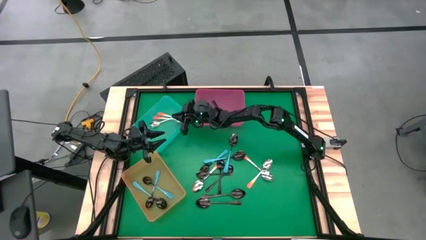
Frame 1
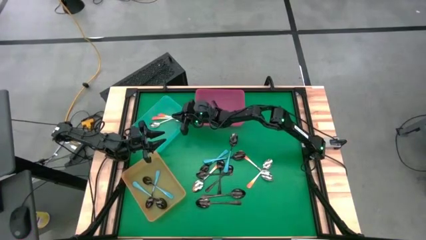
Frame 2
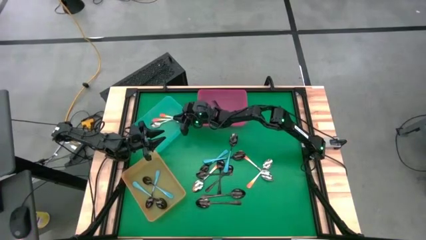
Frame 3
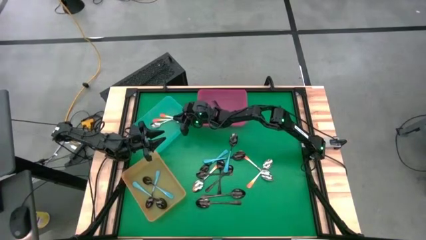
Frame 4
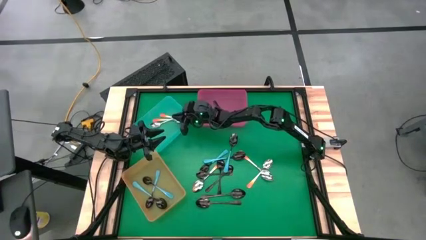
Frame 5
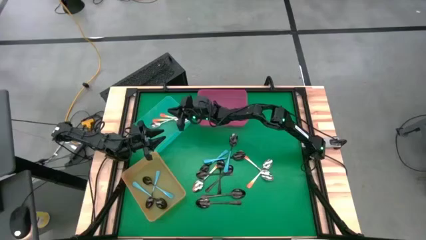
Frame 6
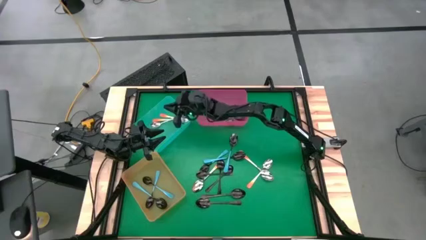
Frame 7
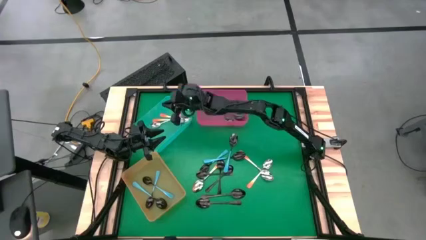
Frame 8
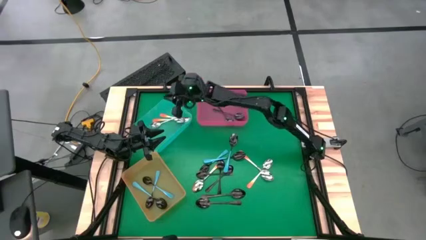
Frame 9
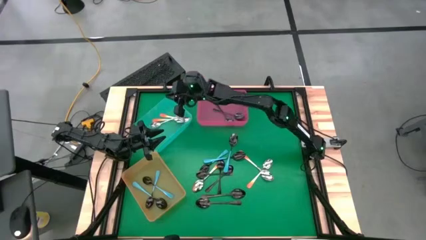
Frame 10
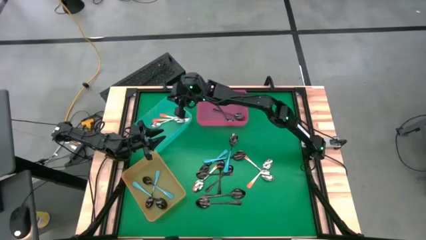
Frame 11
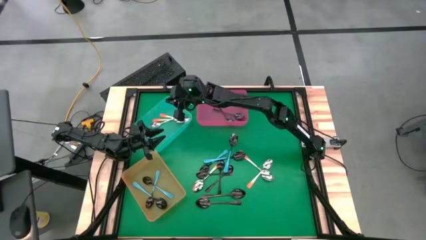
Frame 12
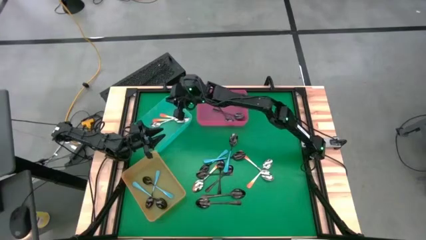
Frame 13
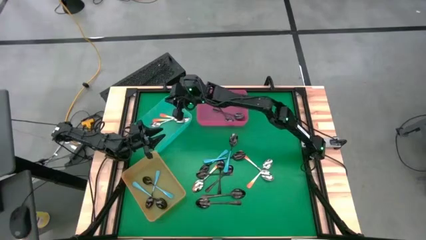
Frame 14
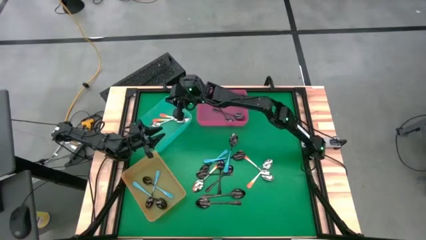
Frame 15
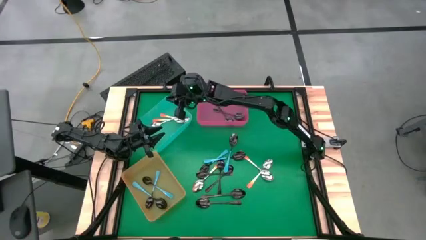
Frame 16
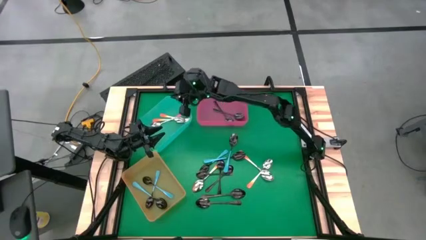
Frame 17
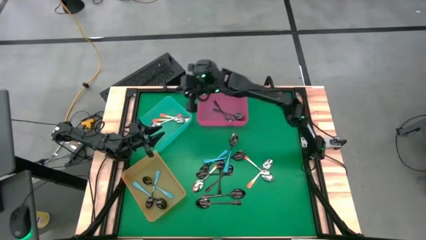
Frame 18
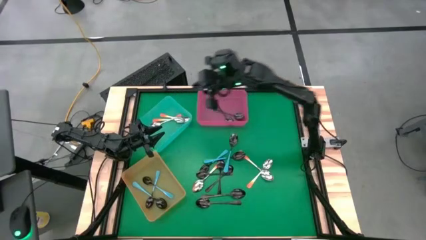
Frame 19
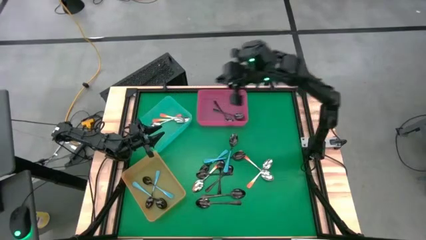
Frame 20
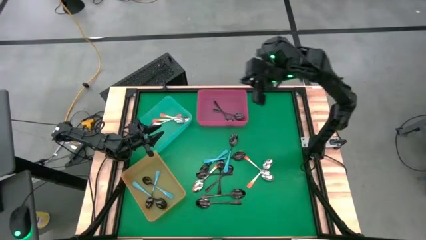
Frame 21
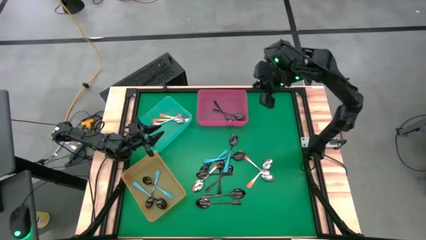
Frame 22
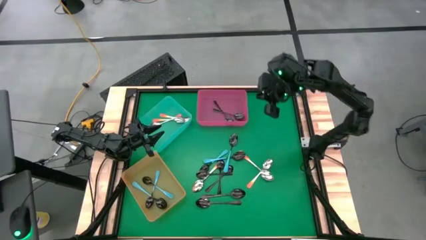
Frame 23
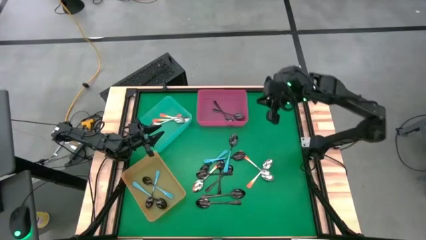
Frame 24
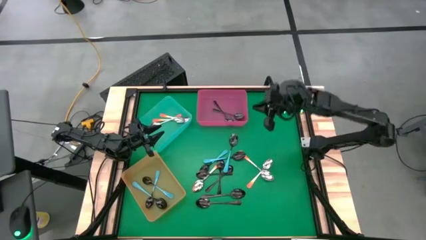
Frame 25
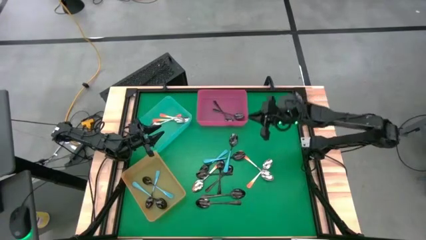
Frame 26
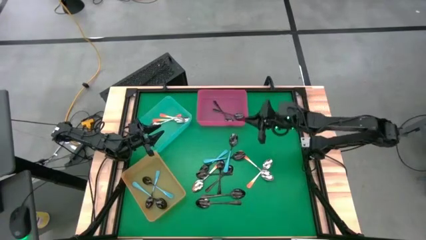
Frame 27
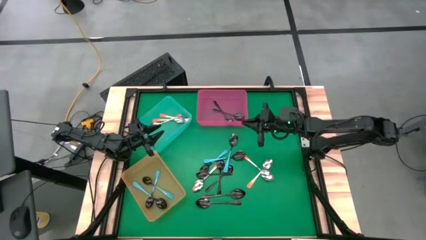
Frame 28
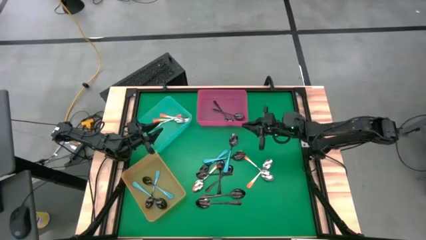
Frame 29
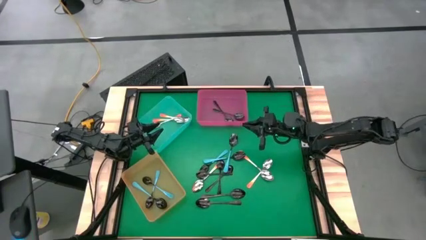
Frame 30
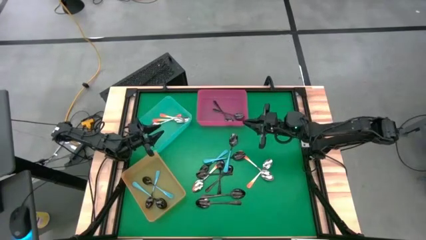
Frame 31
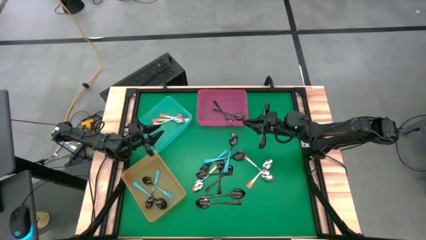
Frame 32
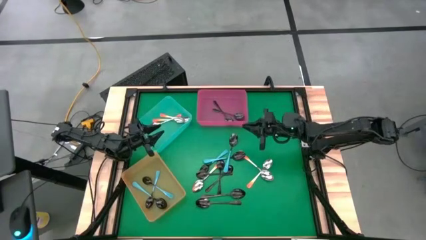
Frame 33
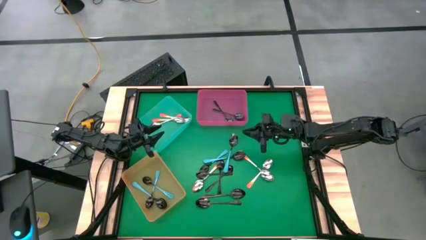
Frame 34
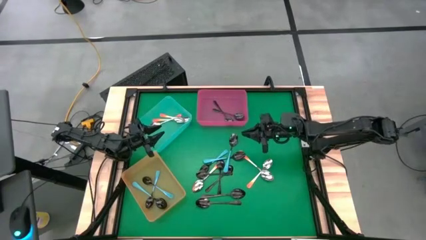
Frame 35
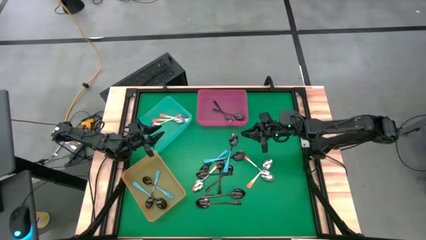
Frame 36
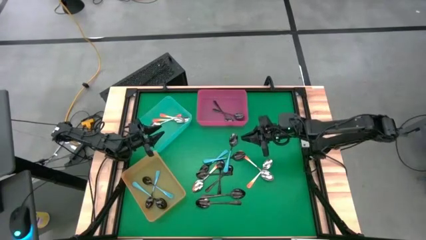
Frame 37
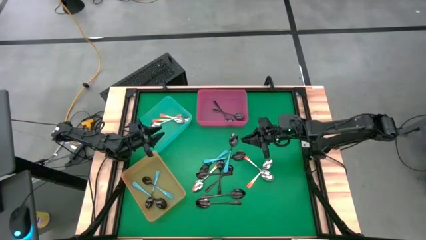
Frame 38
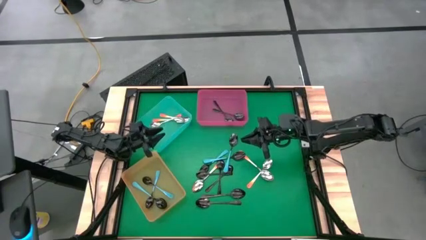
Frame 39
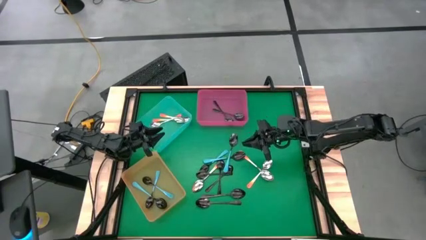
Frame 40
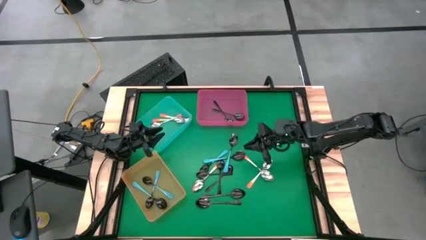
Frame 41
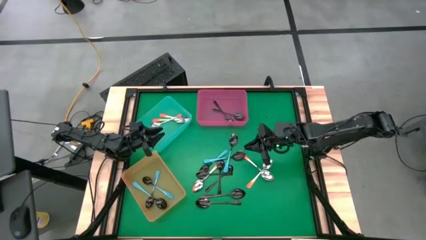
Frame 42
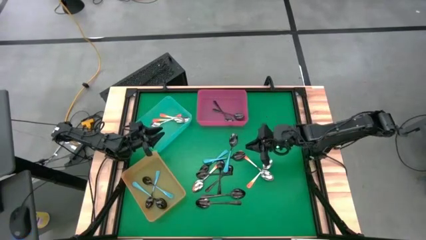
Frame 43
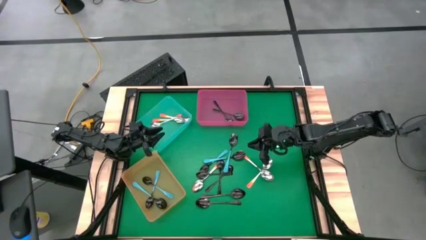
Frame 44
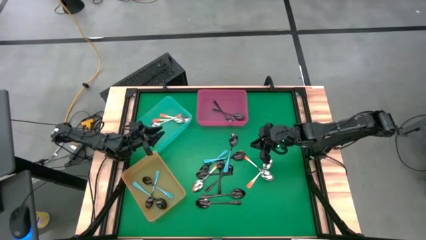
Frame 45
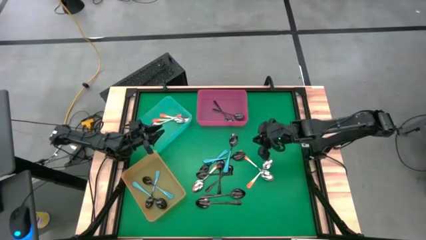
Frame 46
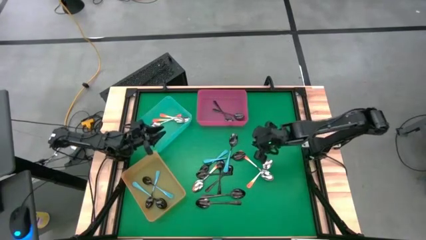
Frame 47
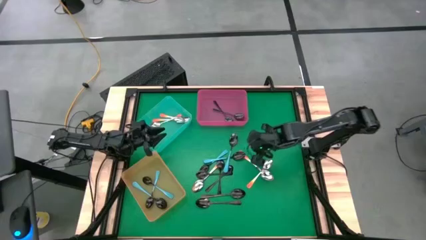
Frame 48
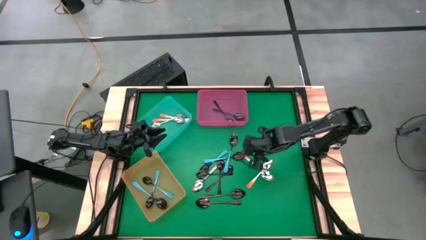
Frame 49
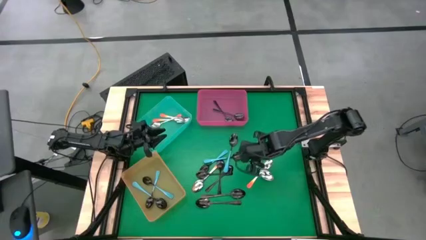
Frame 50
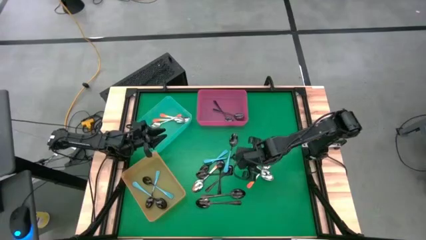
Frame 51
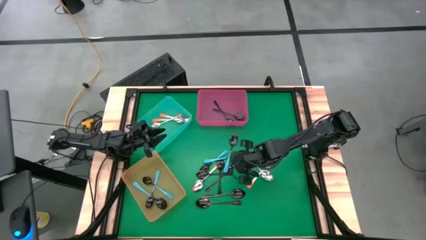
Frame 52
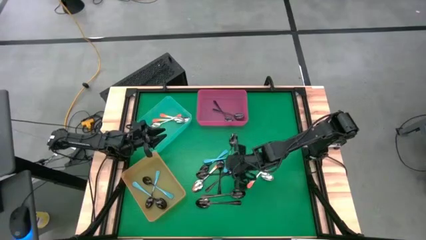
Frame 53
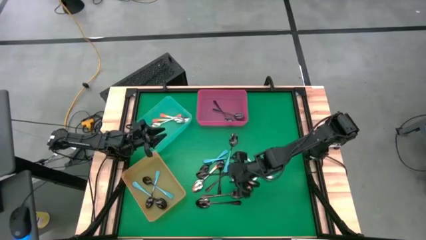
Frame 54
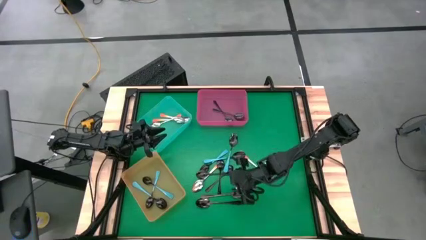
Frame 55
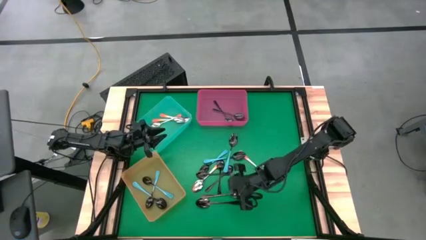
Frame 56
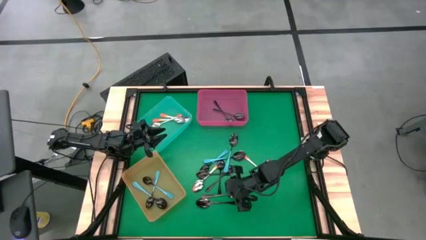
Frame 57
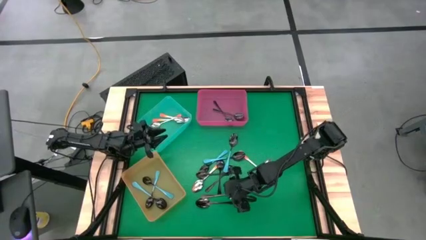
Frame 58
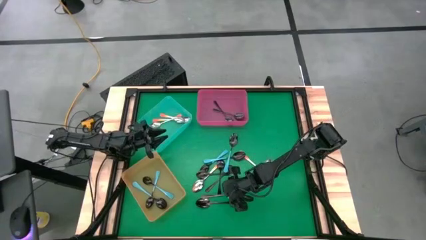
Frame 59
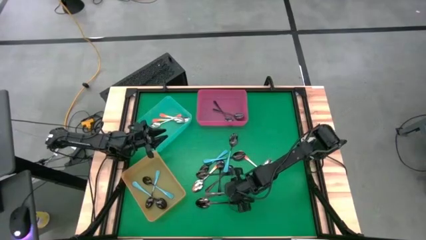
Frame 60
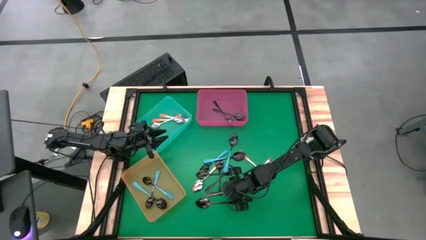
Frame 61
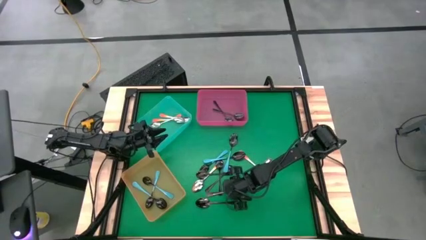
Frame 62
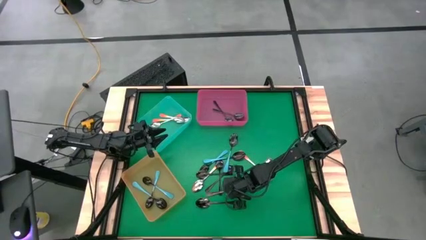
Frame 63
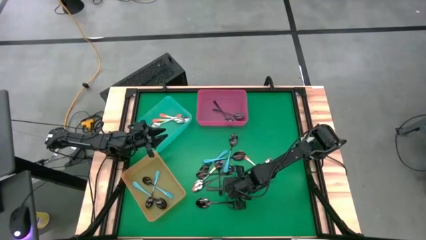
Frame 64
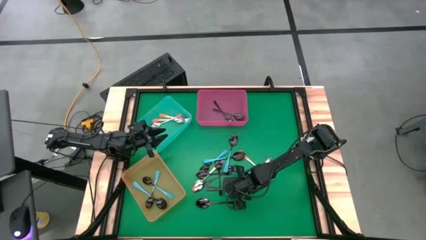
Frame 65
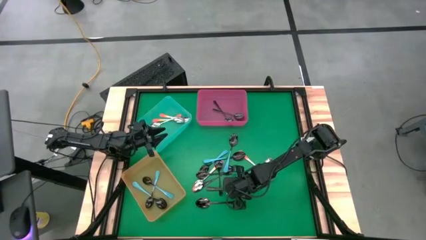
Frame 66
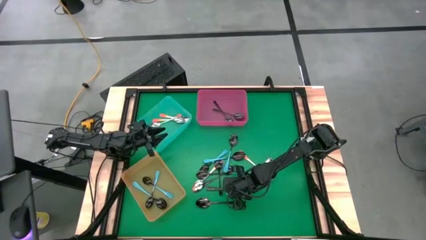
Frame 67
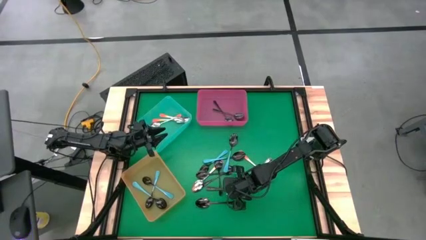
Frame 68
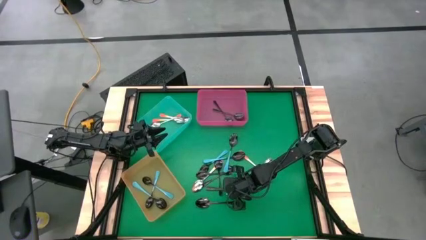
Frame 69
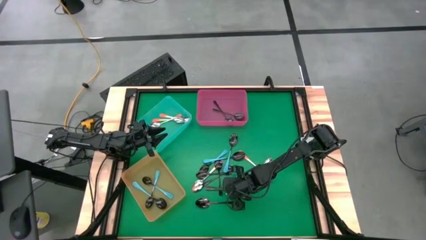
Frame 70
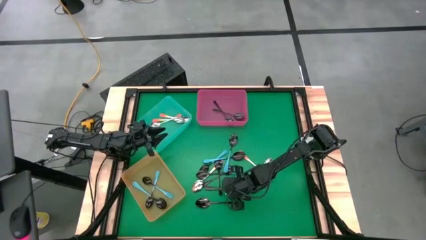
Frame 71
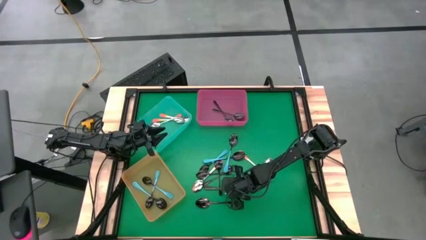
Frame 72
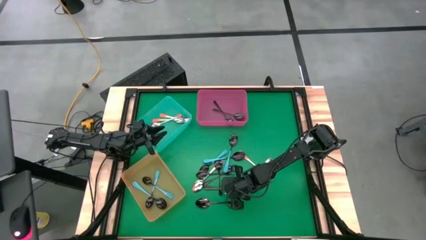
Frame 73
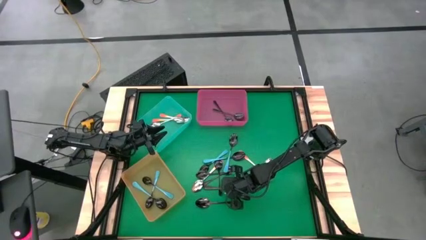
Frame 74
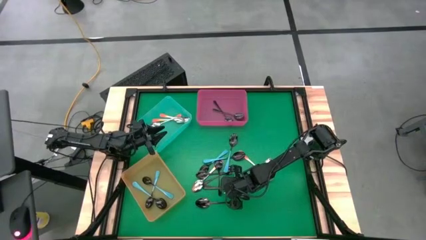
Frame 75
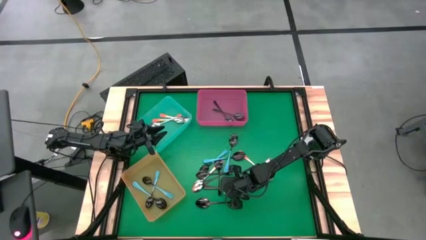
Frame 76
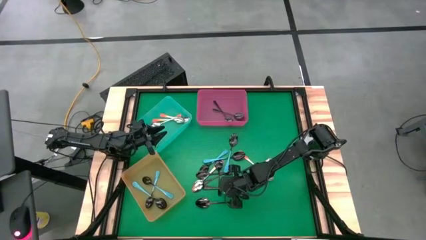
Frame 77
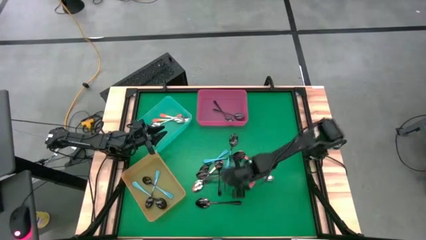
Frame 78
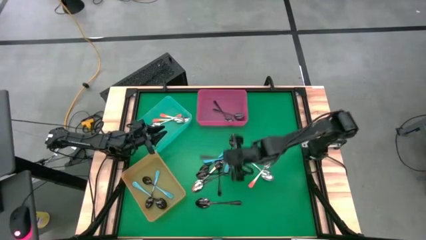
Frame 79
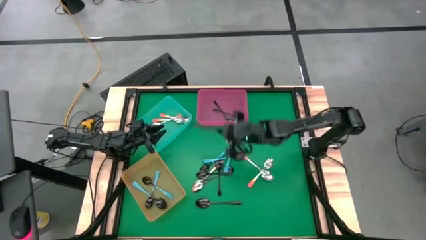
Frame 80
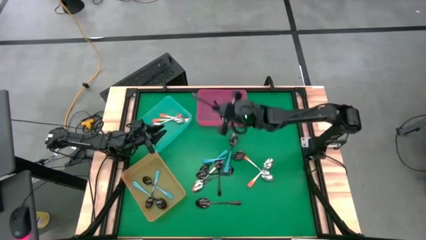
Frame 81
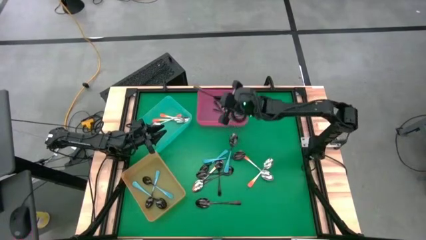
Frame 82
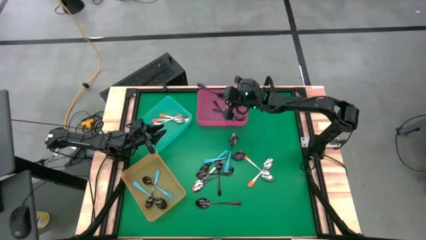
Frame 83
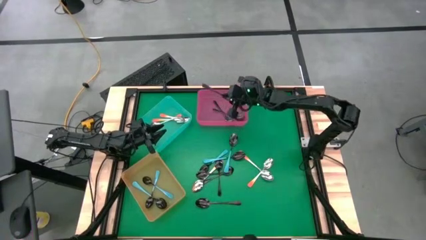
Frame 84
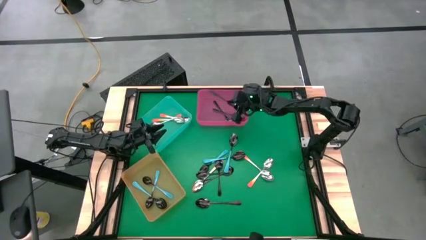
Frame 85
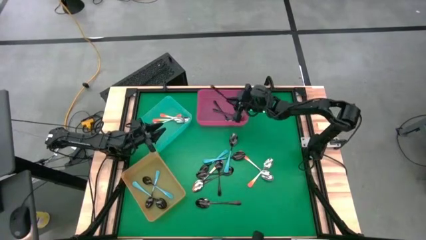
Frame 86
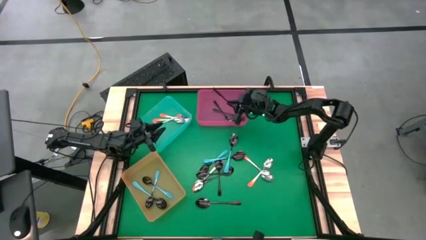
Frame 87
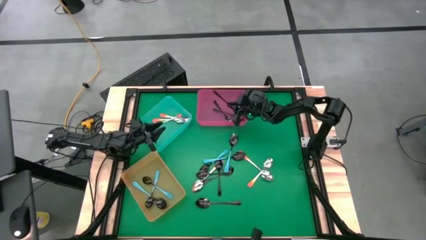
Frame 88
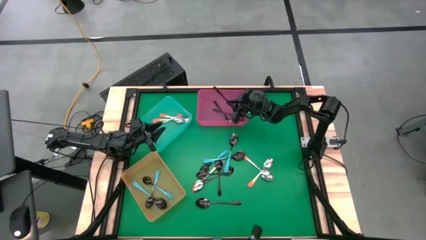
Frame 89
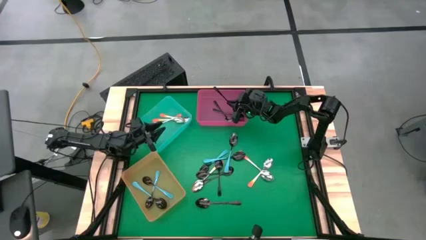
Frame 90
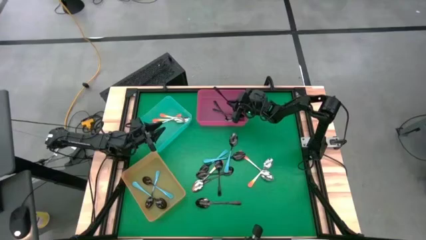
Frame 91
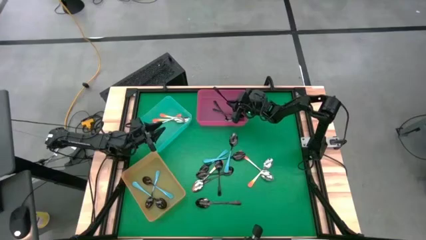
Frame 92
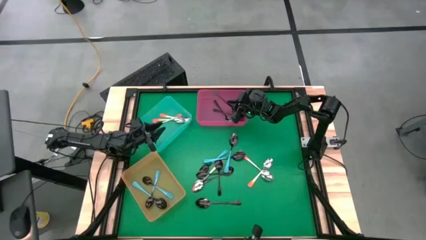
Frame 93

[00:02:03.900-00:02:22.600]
Task: Sort silverware by color (type)
Put the black spoon into the pink bin
